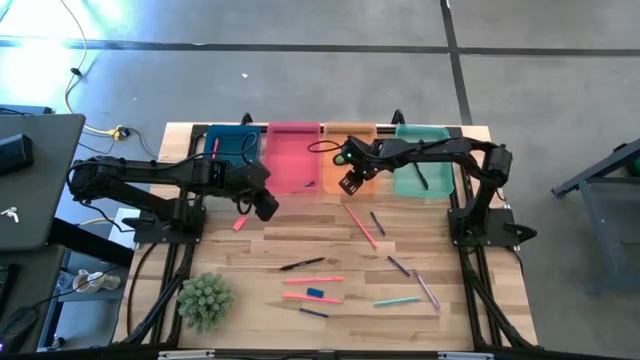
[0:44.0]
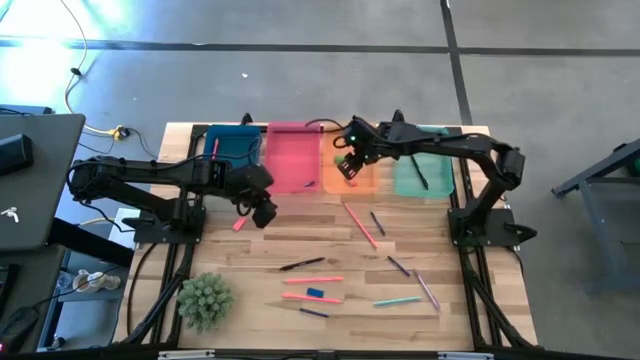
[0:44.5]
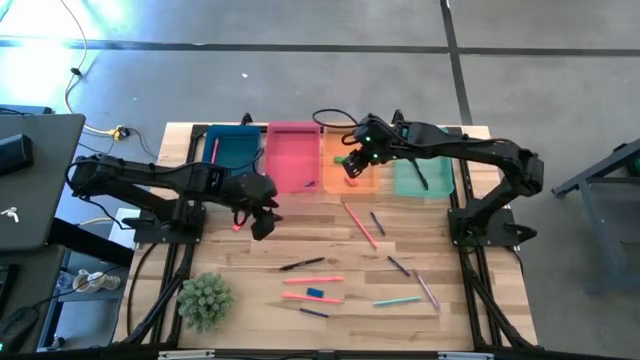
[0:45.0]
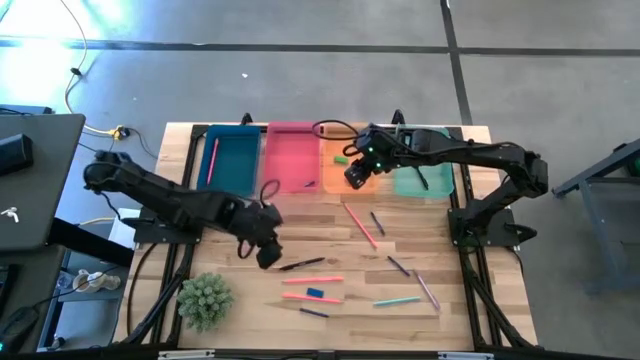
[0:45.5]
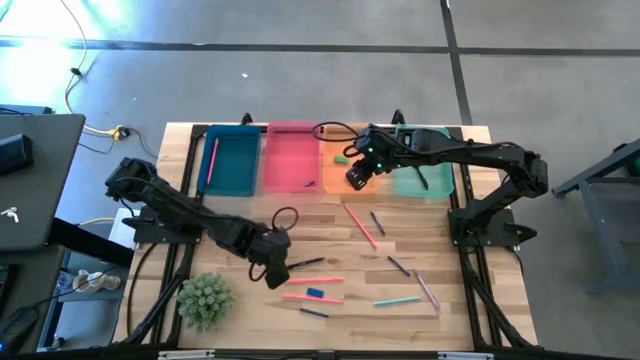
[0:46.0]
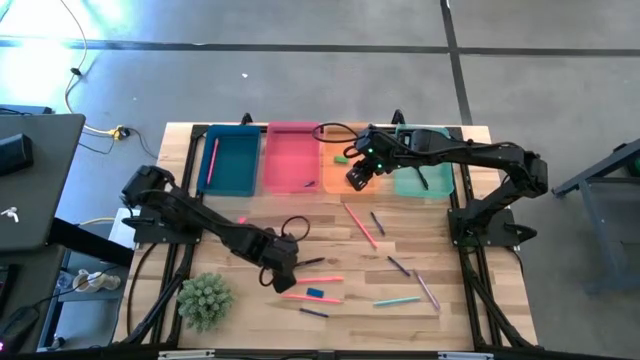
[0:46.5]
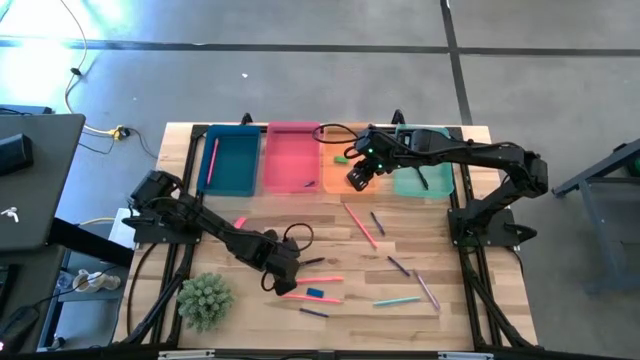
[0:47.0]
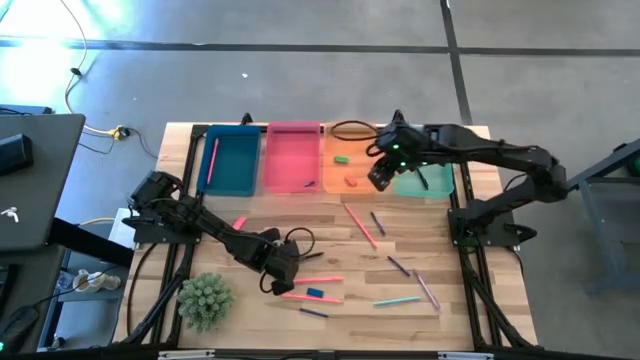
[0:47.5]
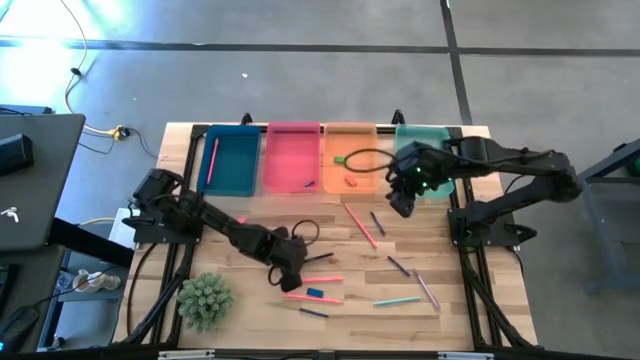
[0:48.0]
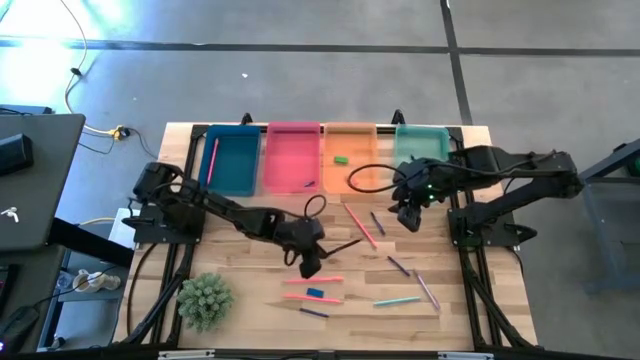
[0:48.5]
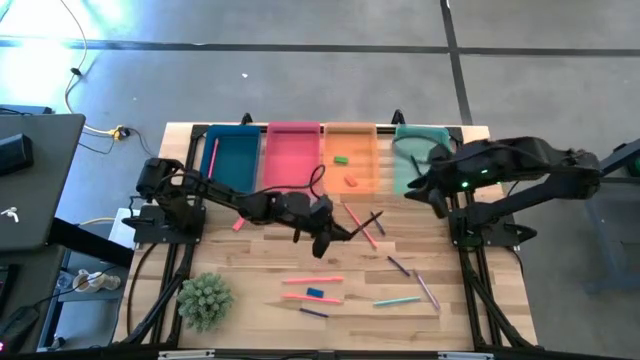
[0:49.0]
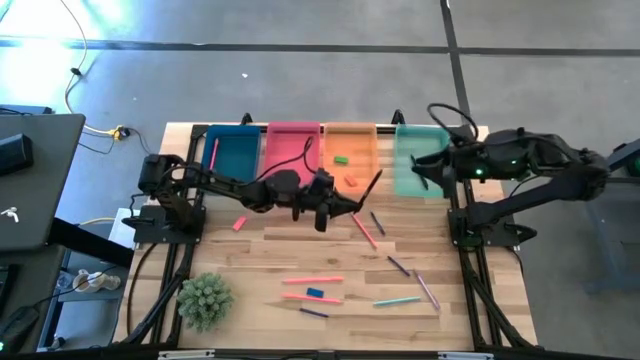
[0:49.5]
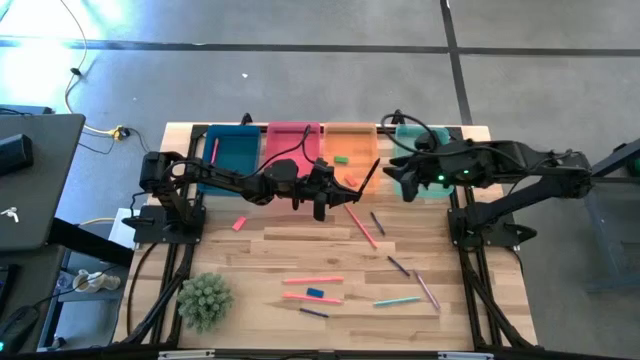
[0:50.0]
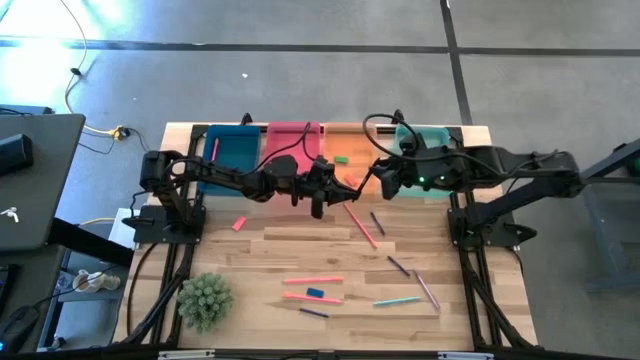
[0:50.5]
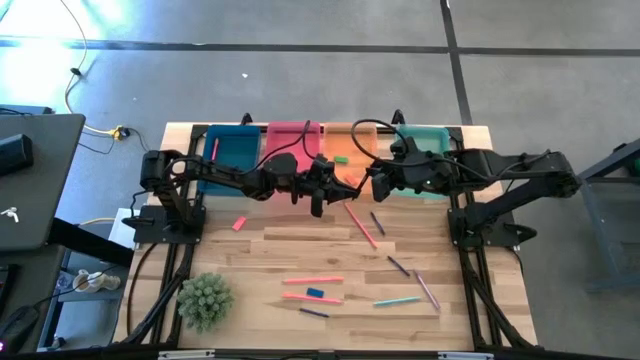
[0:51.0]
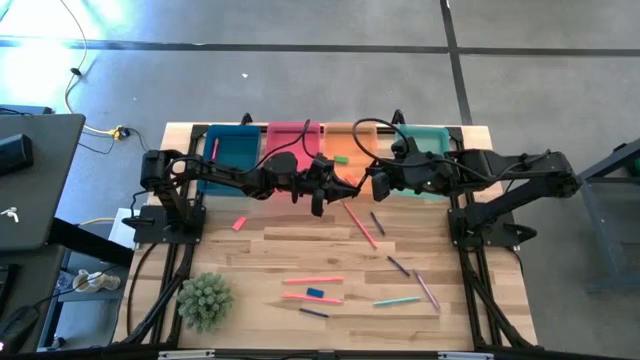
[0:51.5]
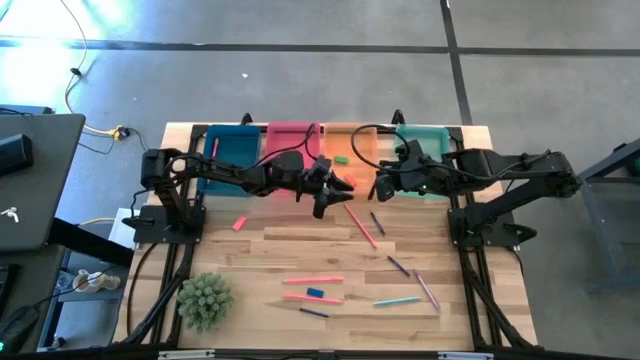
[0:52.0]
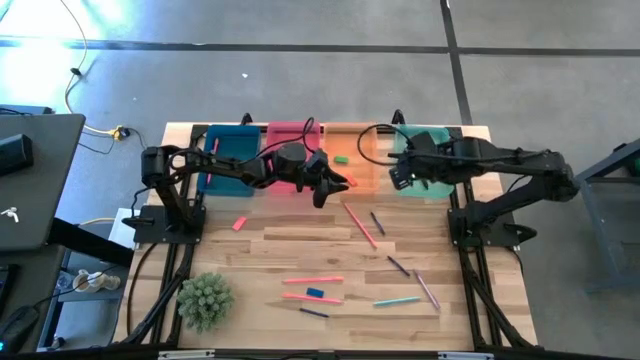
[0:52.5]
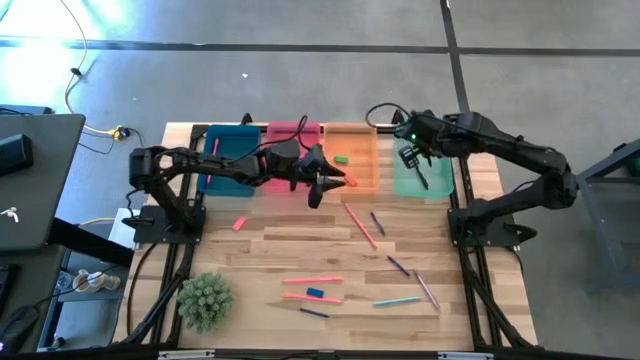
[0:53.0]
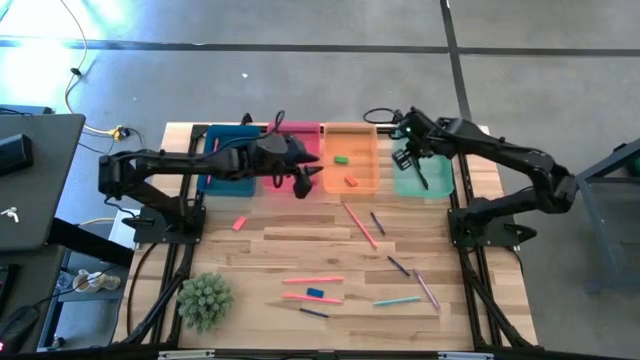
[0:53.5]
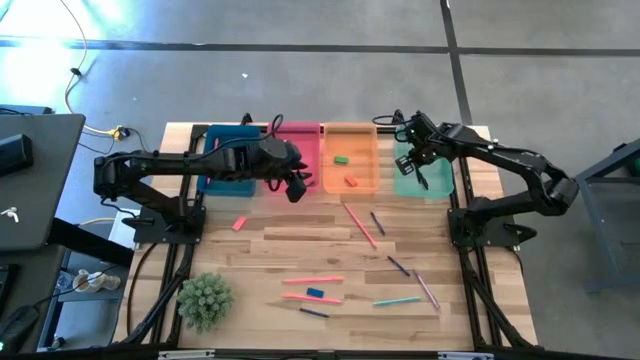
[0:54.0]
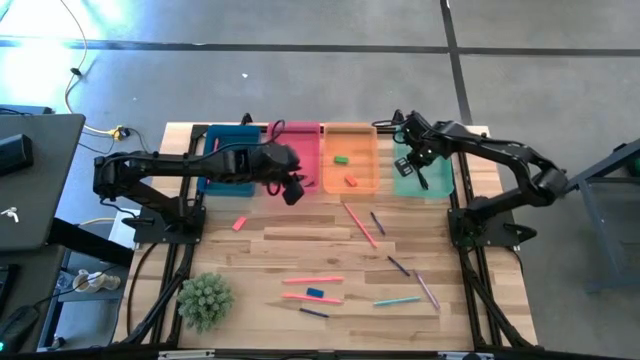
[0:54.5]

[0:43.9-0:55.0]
Task: Sort crayons/erasers/pens/pencils in bins
Put the black pen into the green bin

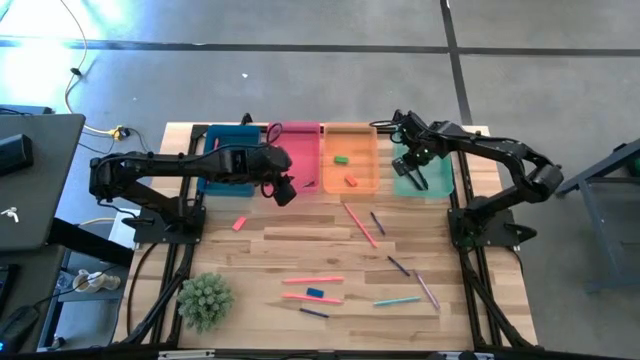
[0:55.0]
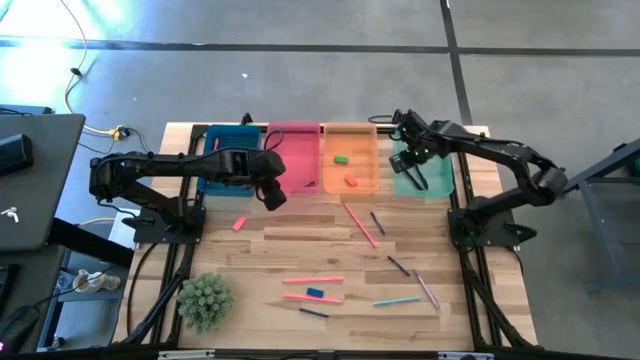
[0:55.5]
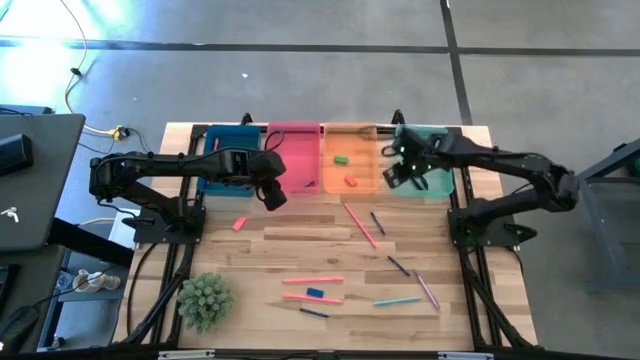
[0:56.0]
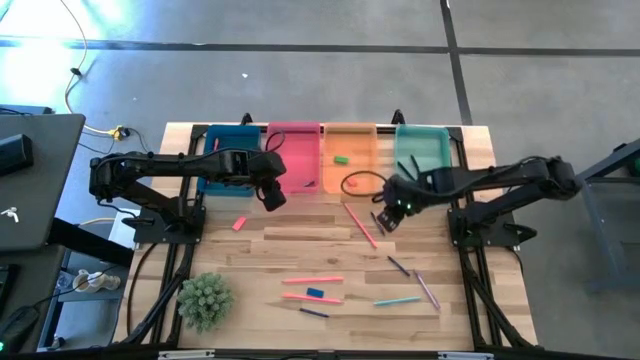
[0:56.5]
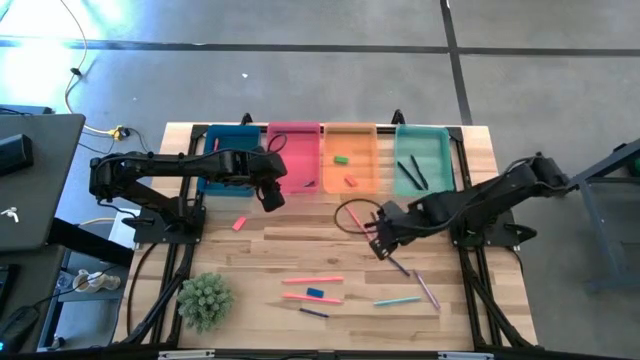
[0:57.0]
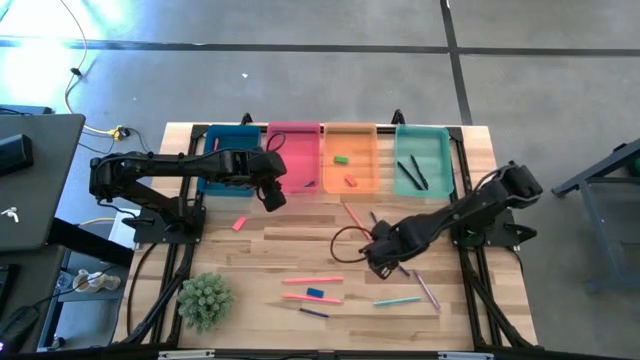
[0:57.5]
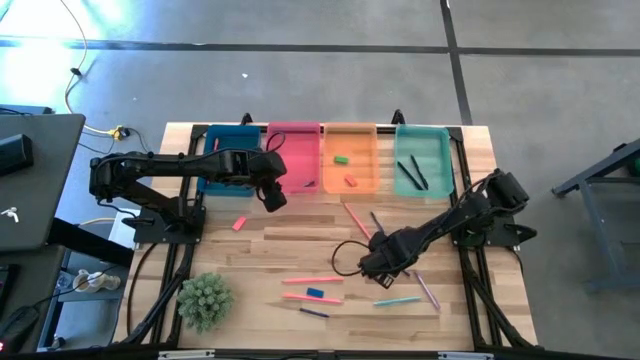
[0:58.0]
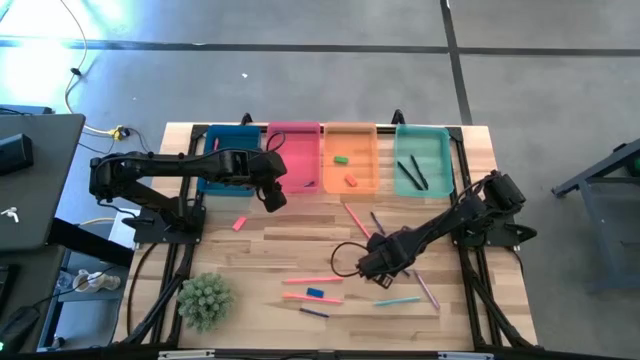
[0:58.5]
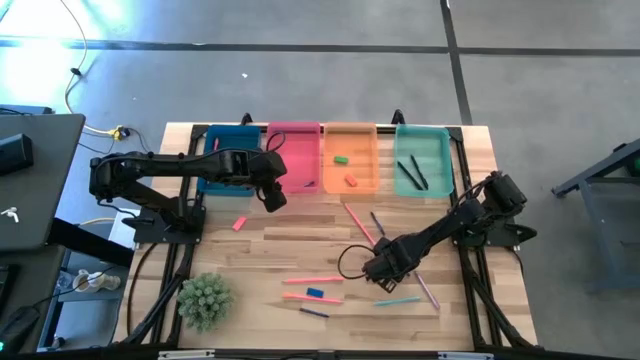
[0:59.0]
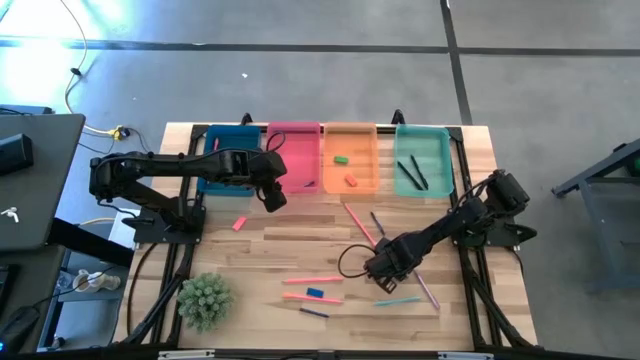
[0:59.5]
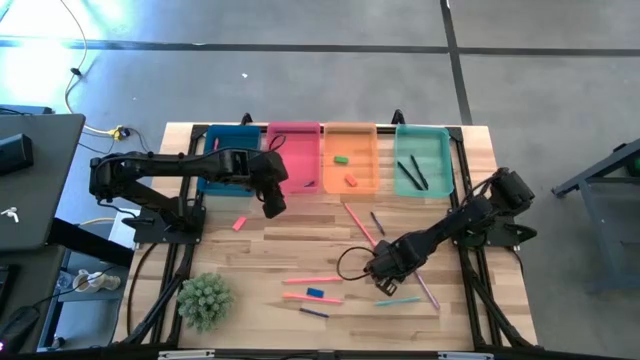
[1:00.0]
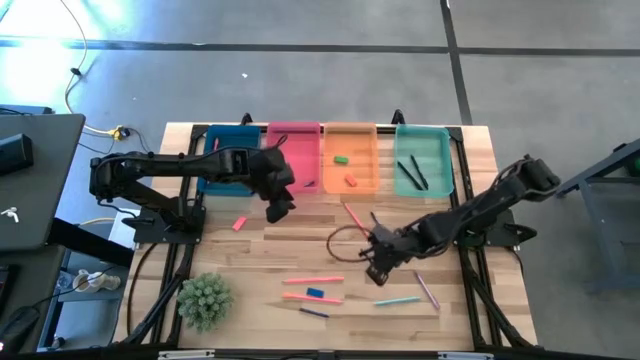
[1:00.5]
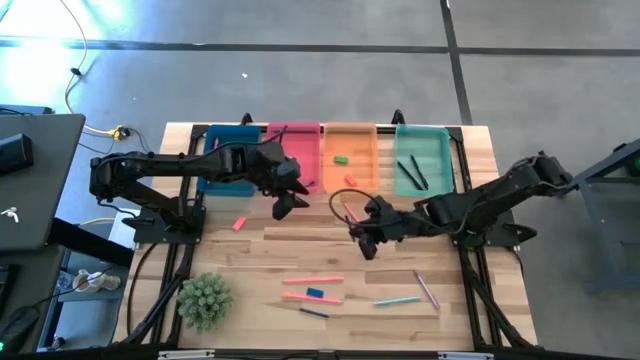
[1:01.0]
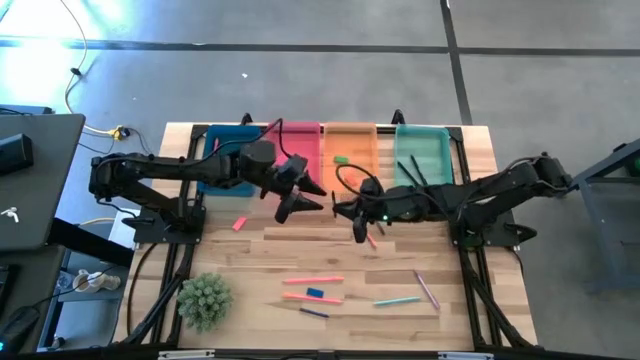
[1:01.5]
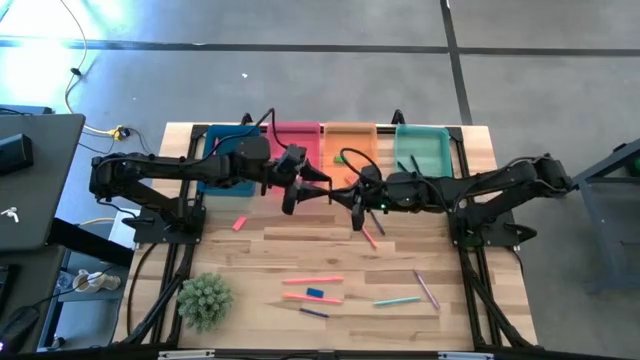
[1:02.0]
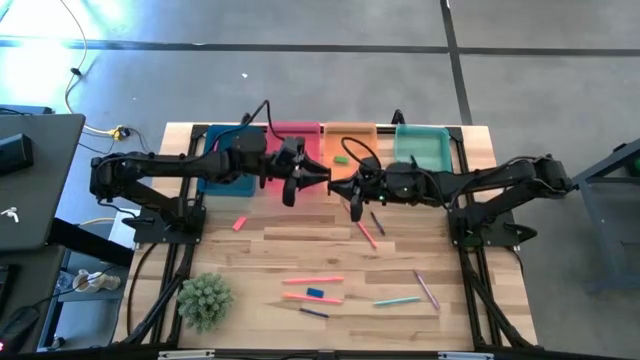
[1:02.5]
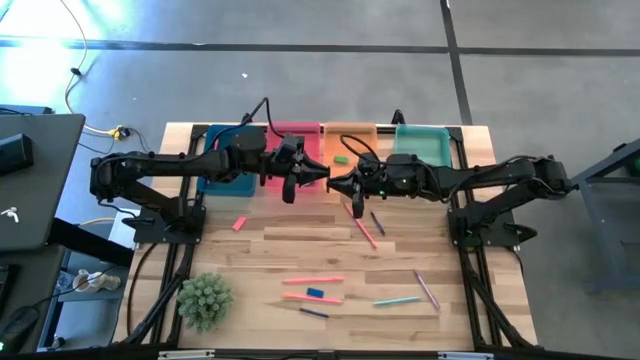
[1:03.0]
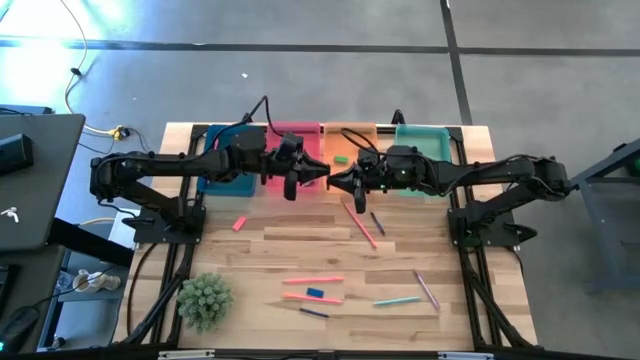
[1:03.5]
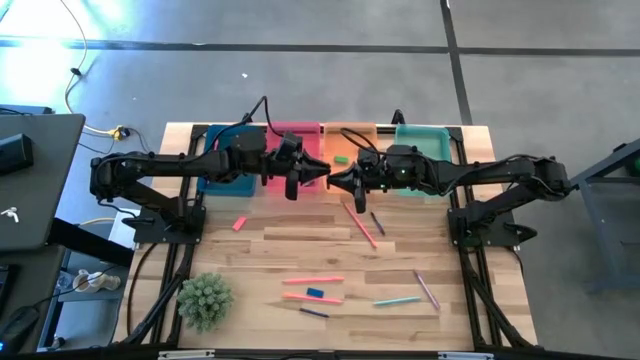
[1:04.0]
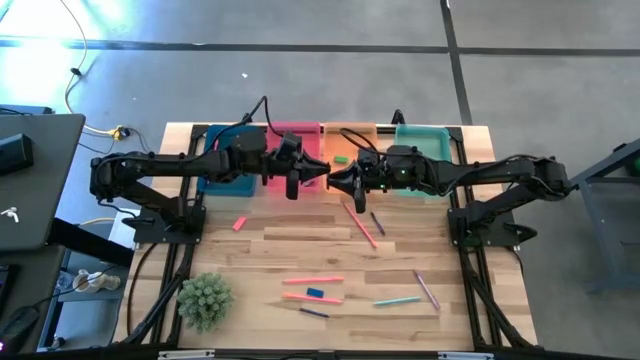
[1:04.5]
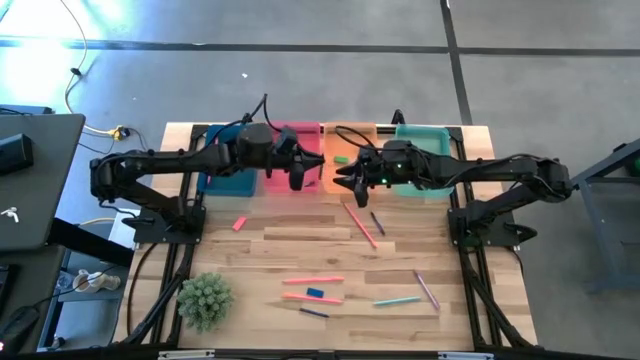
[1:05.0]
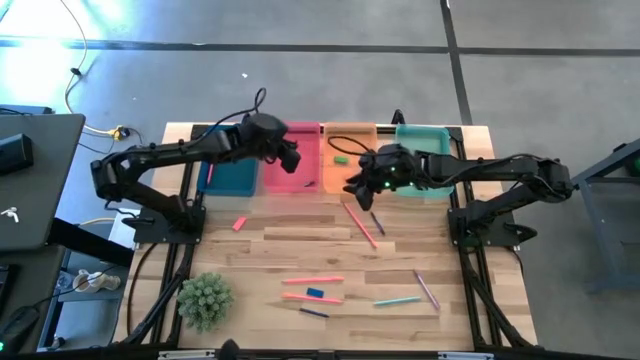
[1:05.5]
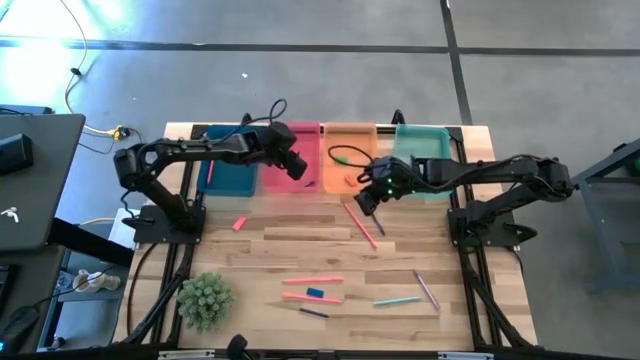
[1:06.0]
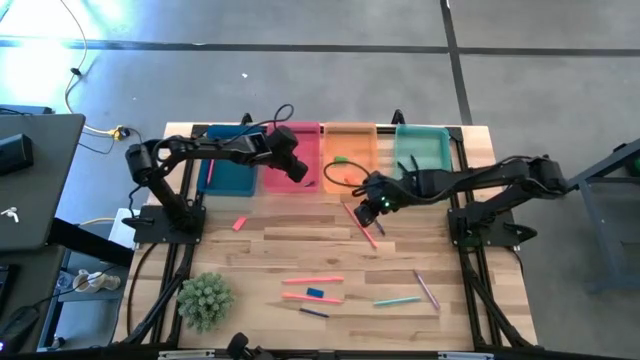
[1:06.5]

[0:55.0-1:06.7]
Put the middle blue crayon into the pink bin
